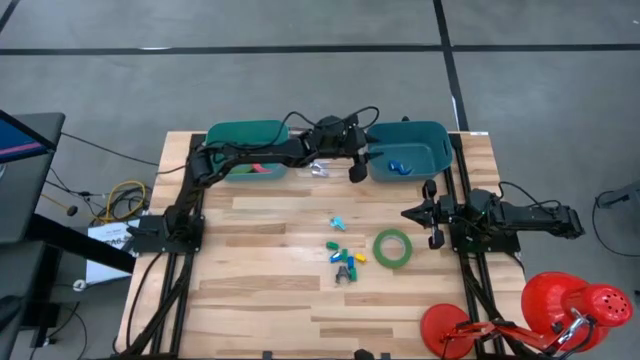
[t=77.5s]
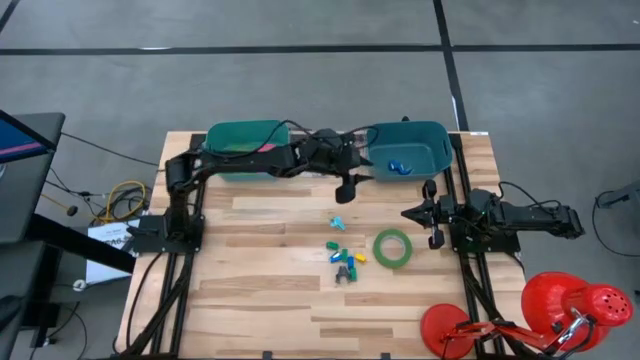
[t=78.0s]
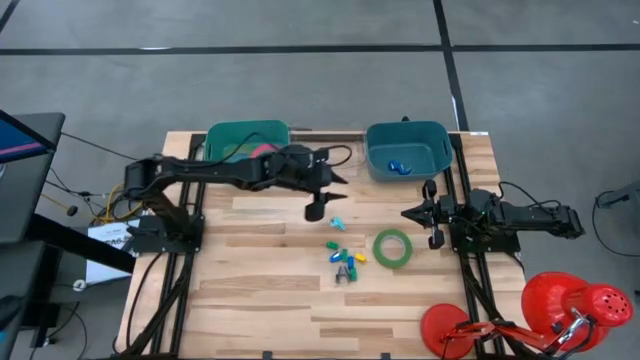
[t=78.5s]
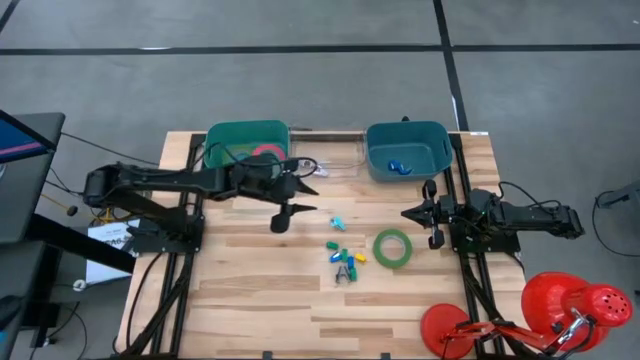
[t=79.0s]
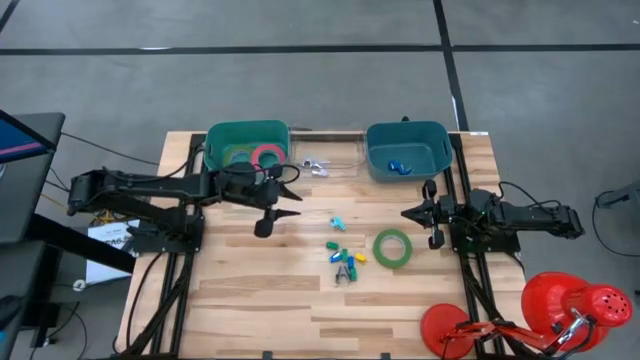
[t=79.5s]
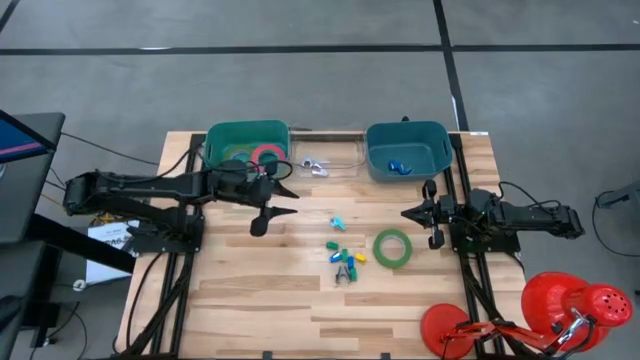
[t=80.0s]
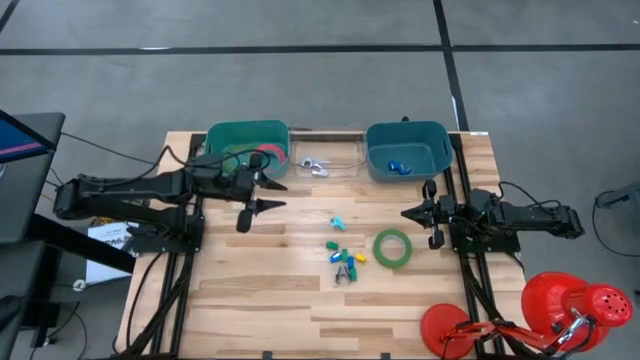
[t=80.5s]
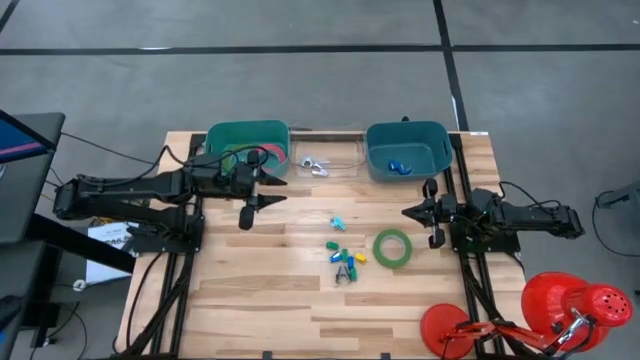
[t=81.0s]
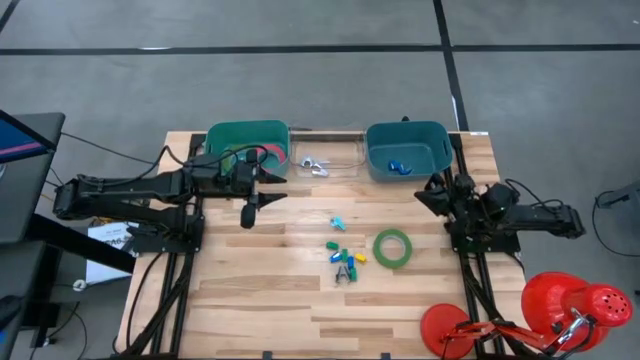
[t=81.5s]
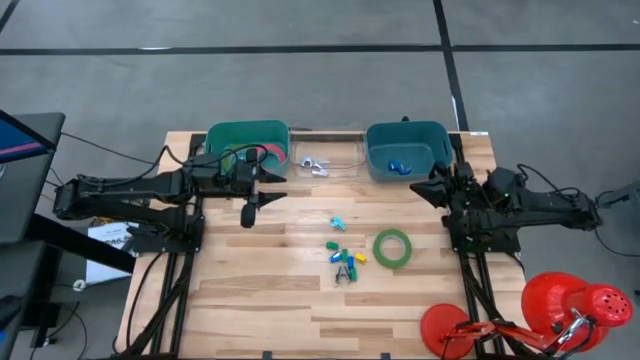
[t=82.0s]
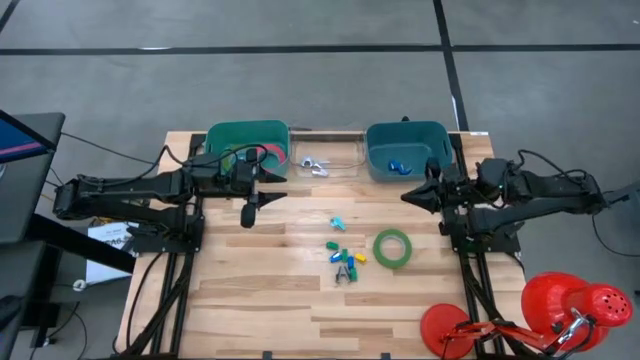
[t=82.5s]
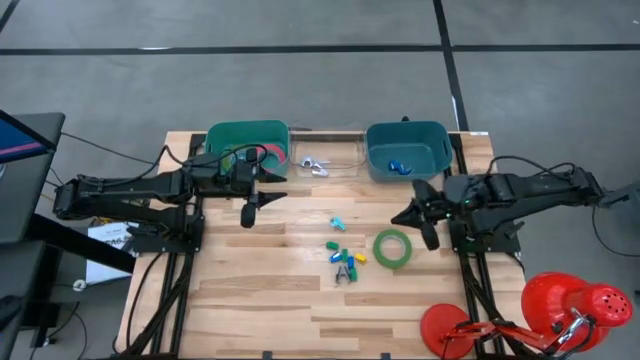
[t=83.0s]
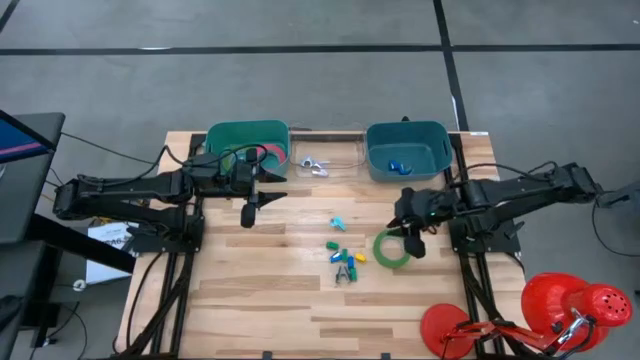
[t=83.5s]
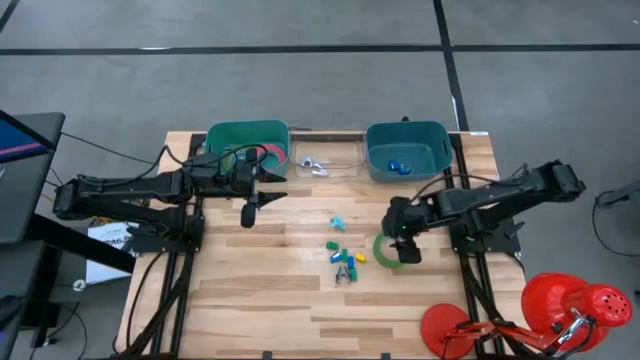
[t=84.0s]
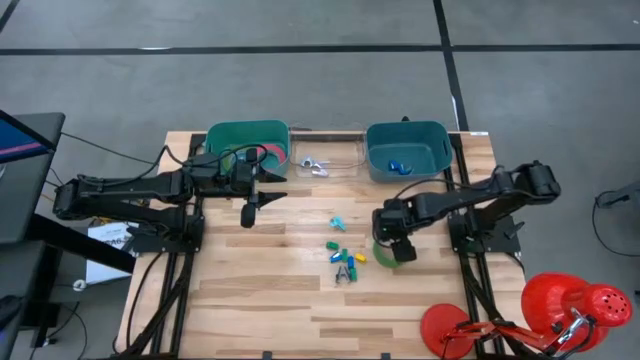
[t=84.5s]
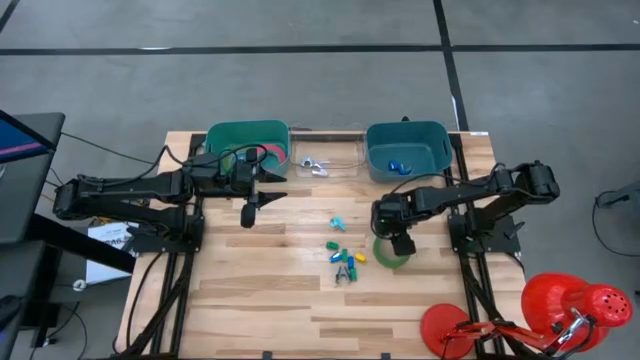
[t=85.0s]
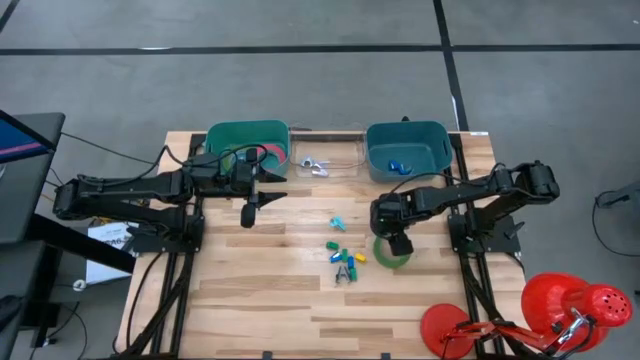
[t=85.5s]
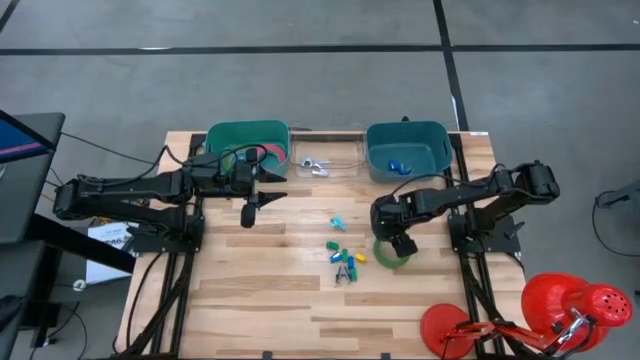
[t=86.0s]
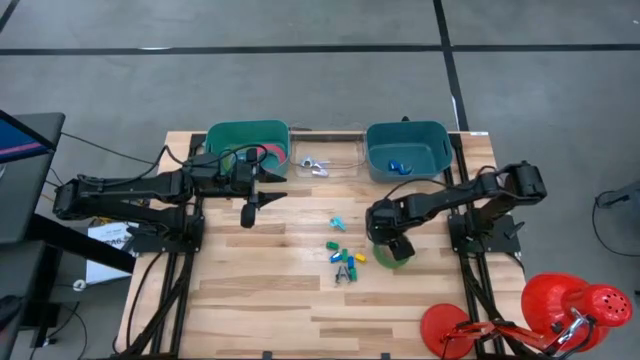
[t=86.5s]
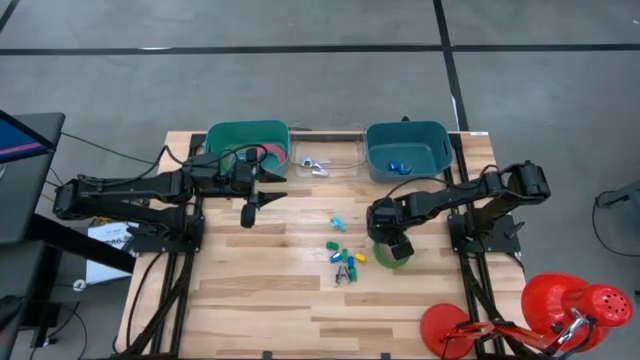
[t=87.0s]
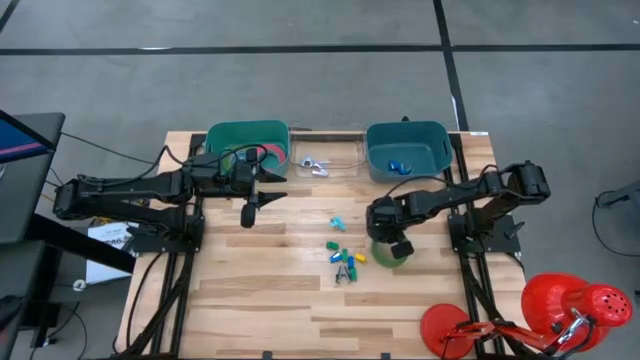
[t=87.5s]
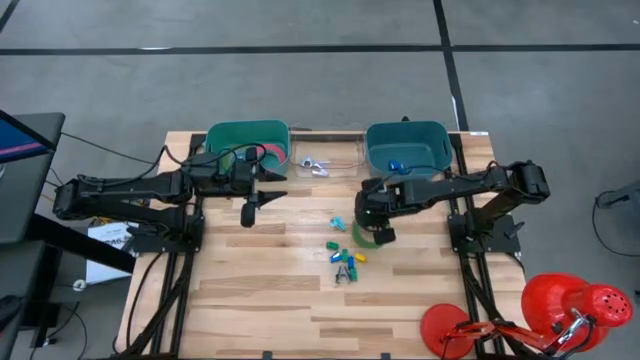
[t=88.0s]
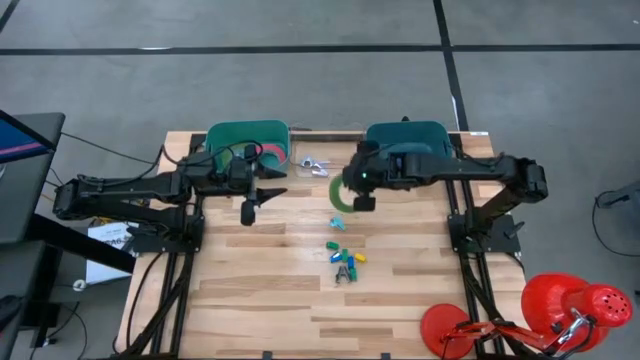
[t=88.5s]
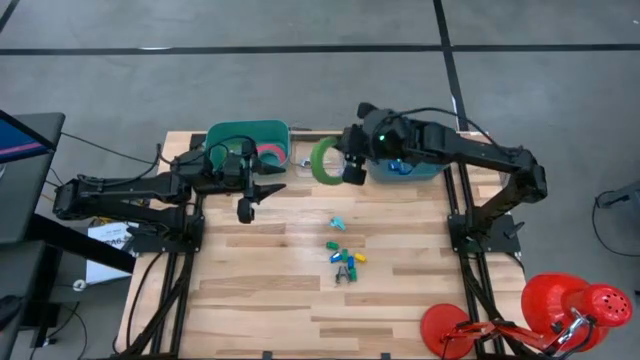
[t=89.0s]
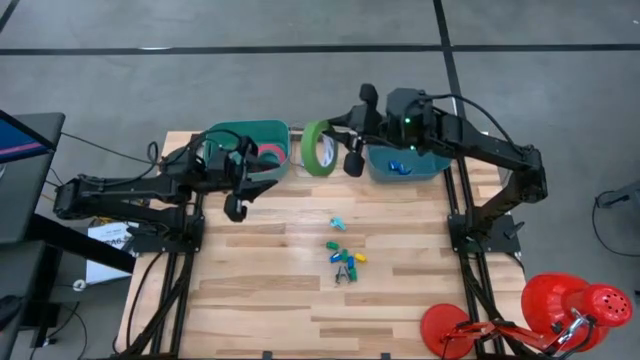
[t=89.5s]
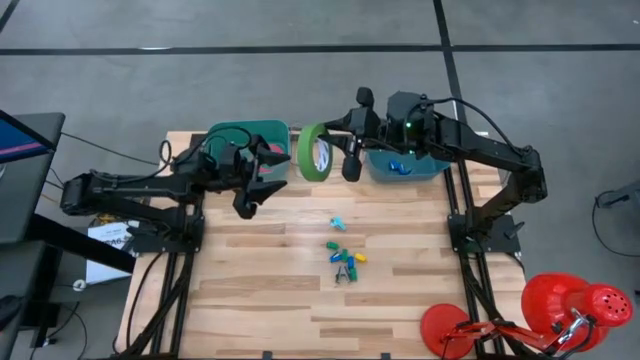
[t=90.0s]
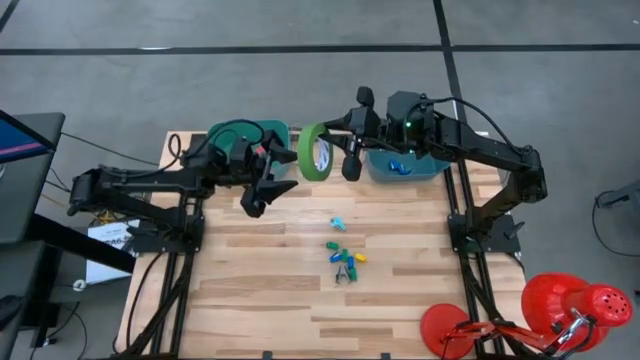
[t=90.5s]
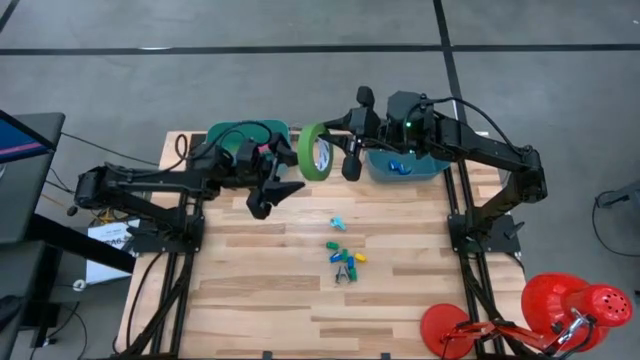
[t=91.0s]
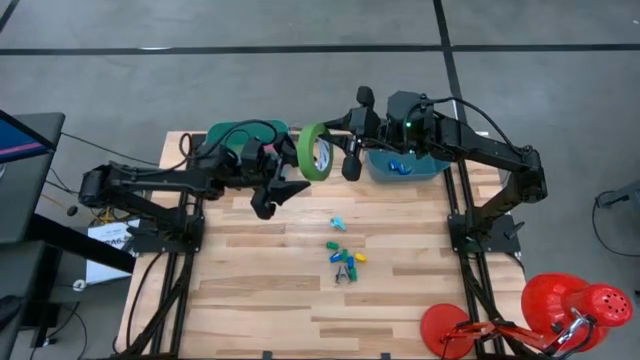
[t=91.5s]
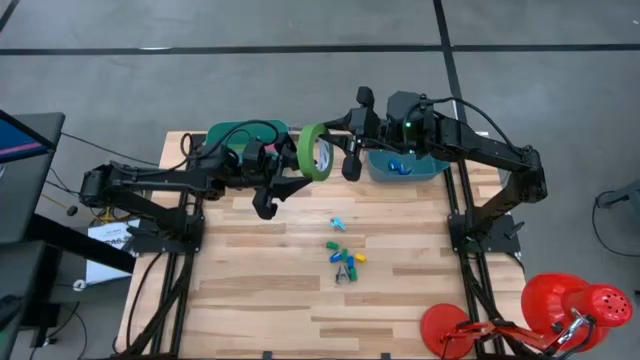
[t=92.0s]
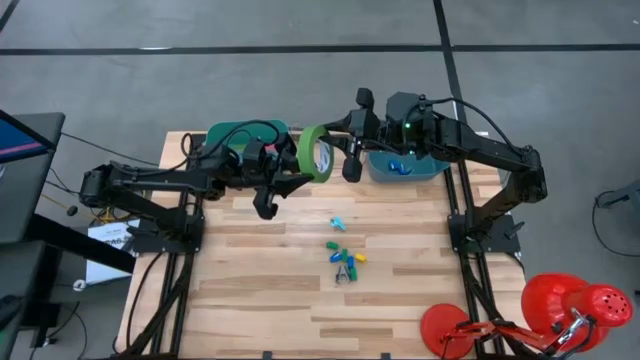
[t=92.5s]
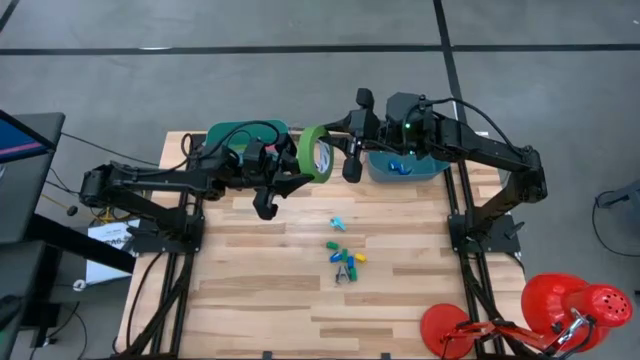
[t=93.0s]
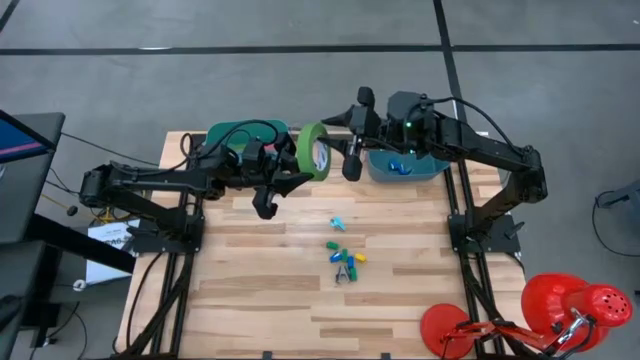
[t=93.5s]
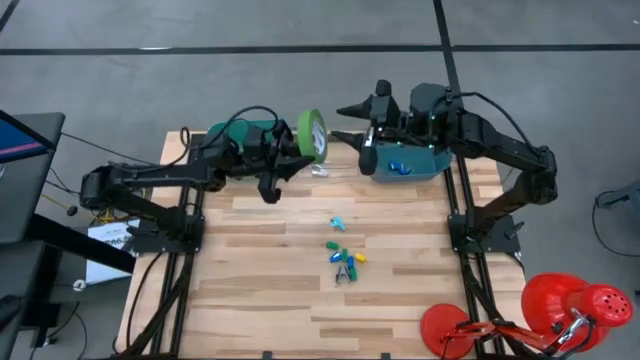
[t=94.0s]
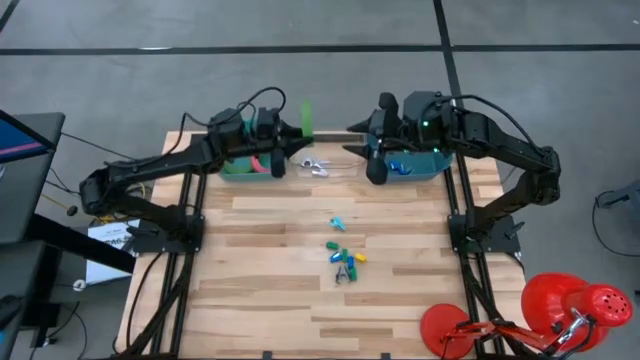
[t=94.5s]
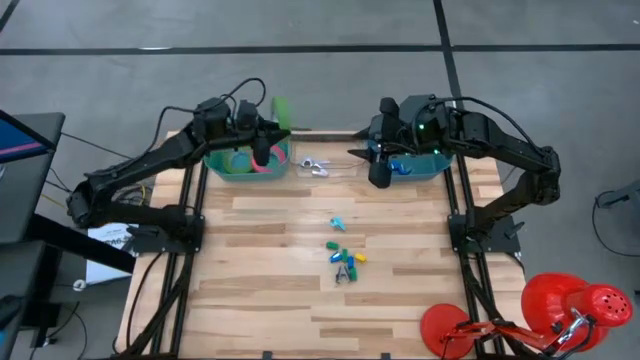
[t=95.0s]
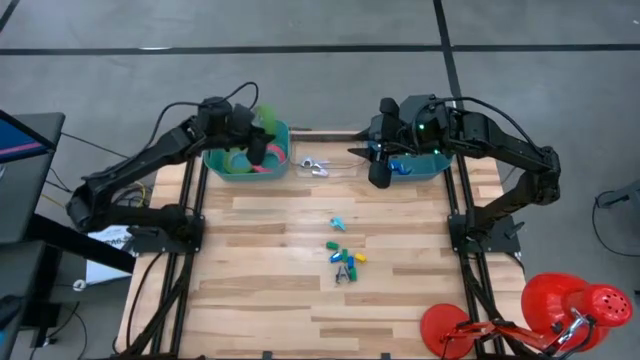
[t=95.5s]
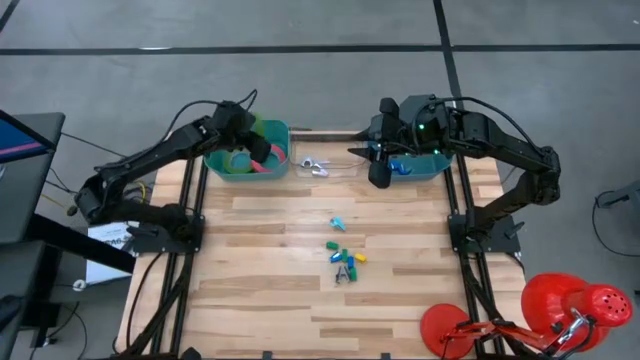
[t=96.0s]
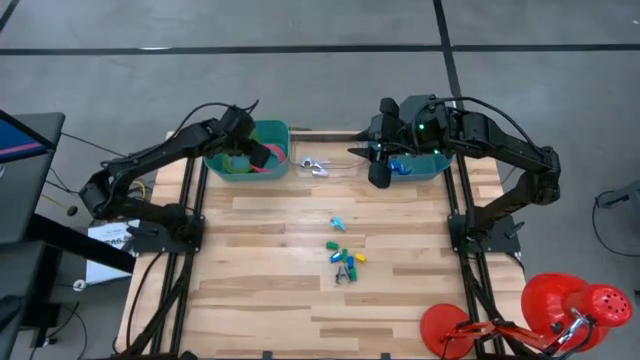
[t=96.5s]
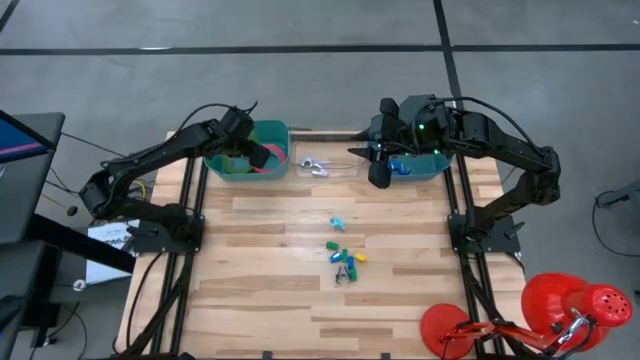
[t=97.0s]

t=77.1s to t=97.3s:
Task: Pick and place Stapler, Stapler remover, tape
Put the green tape into the green bin
